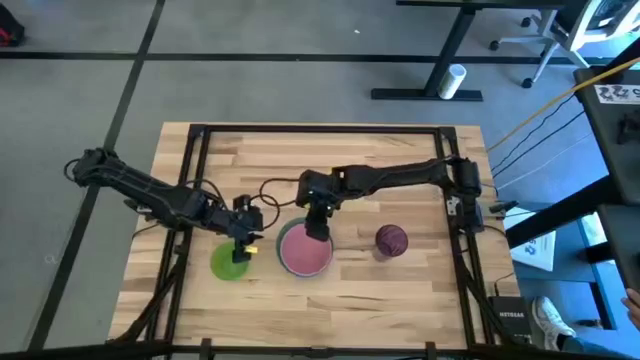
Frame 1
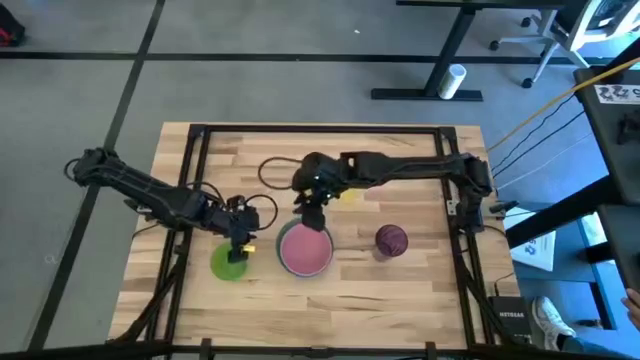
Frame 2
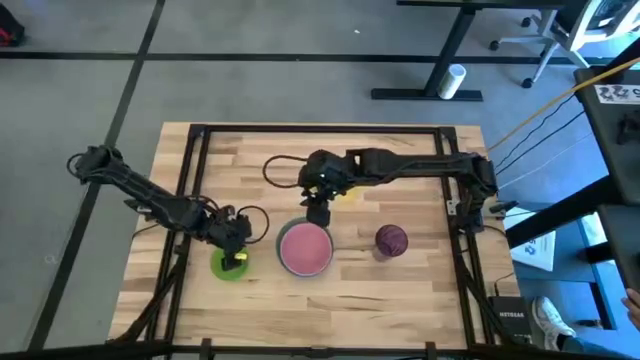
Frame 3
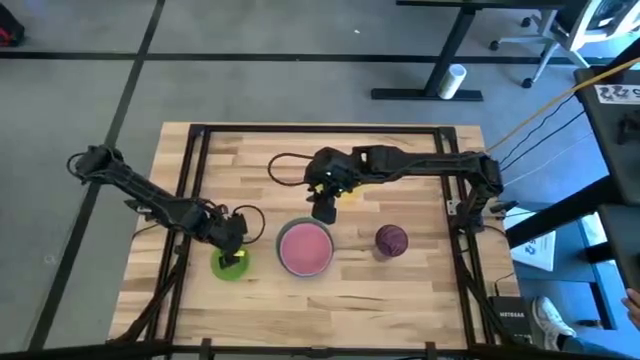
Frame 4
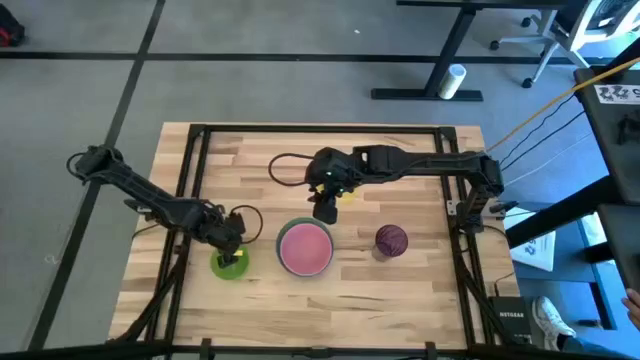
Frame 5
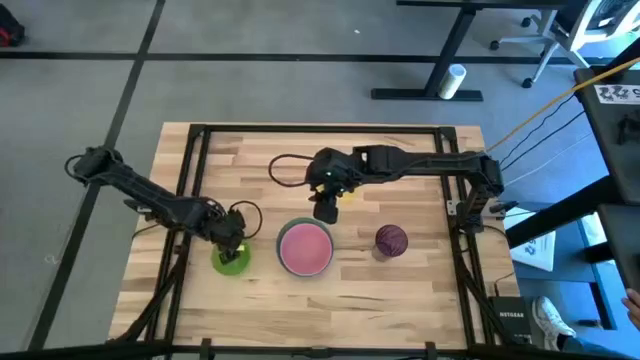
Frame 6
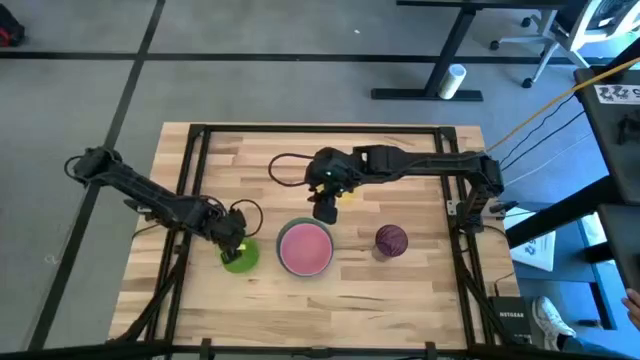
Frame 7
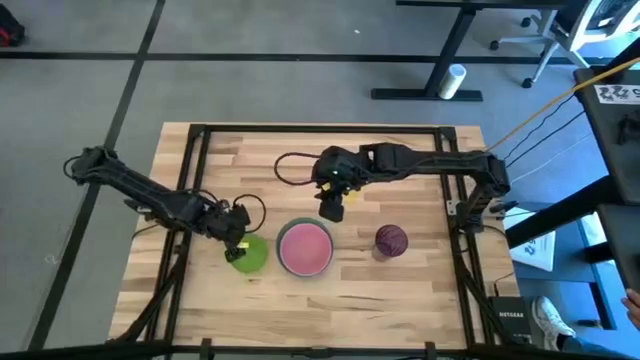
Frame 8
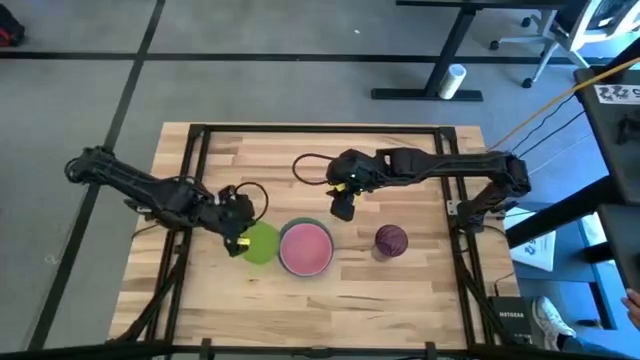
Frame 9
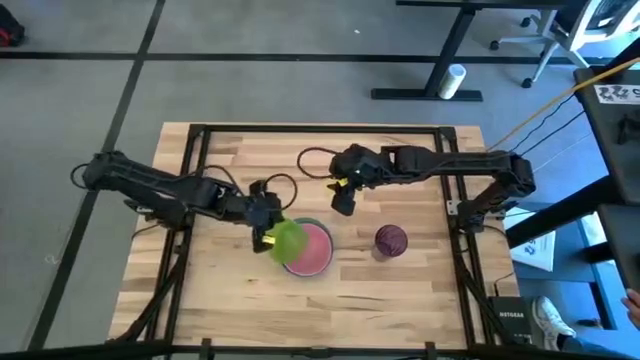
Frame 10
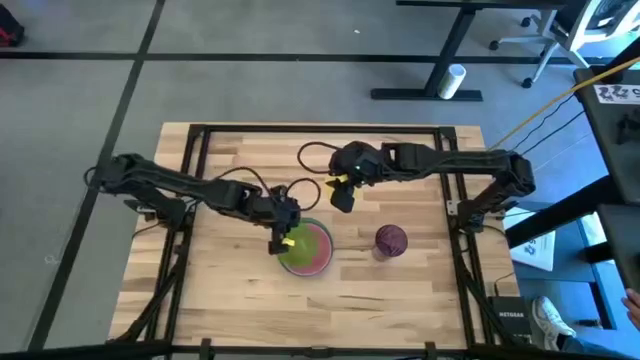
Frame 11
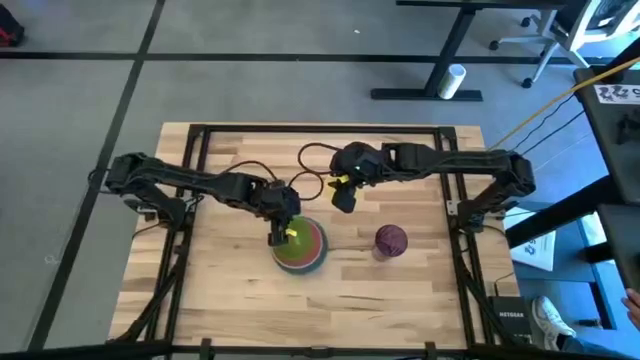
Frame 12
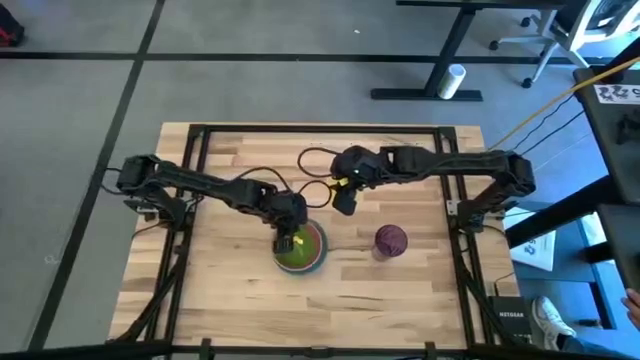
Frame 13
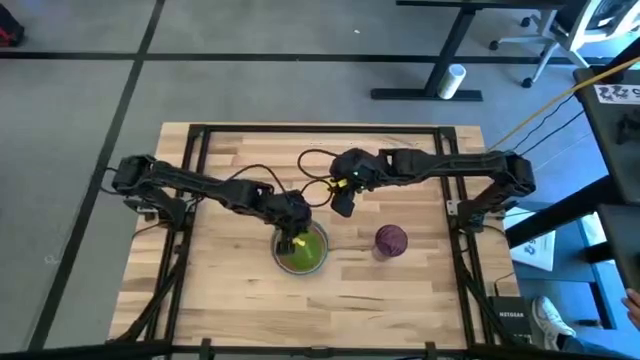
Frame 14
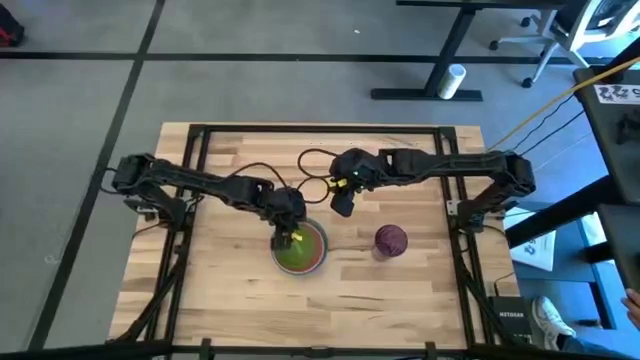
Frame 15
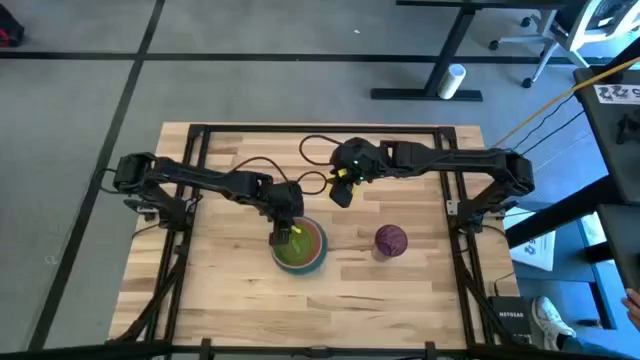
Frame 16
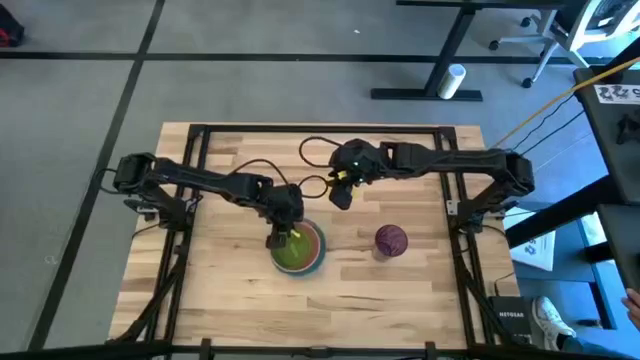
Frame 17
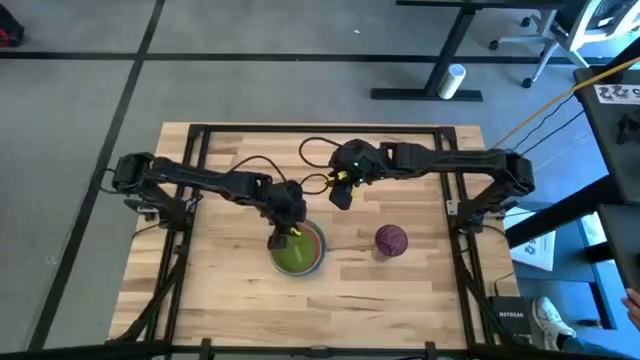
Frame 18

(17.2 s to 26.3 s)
Stack the green bowl on top of the pink bowl

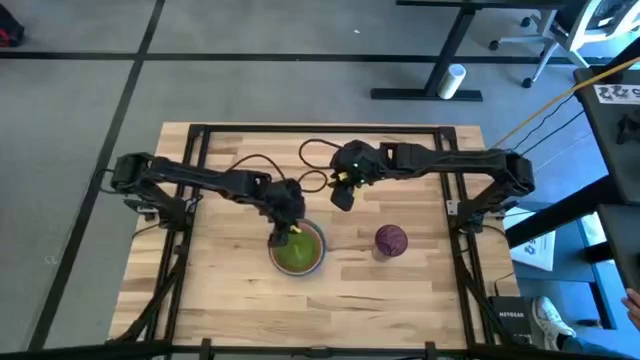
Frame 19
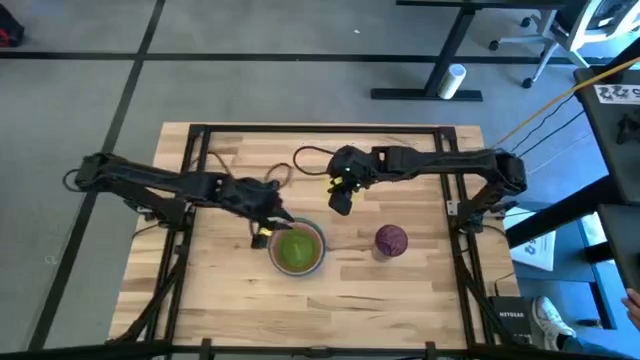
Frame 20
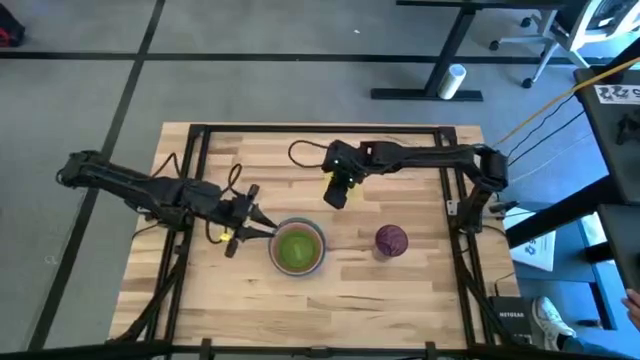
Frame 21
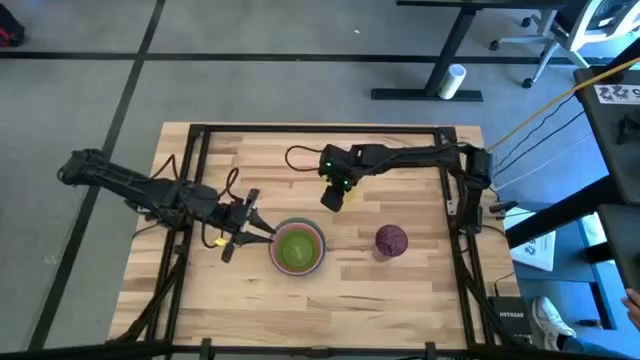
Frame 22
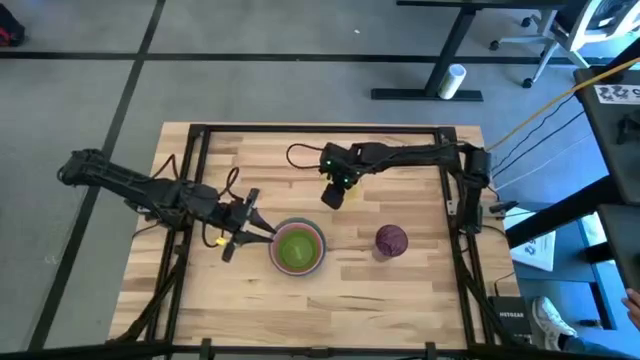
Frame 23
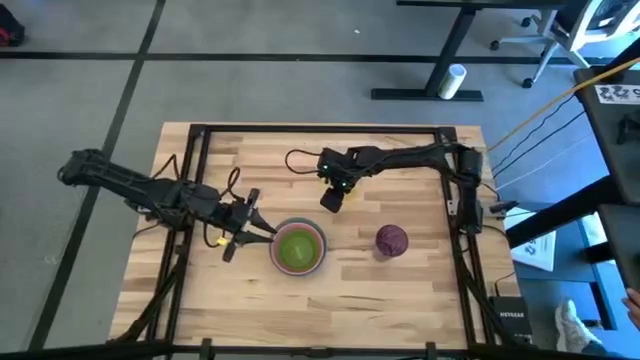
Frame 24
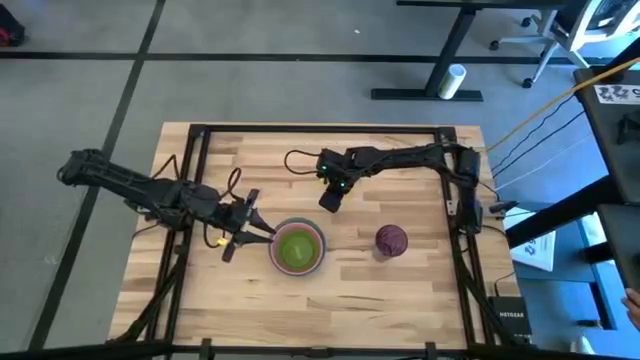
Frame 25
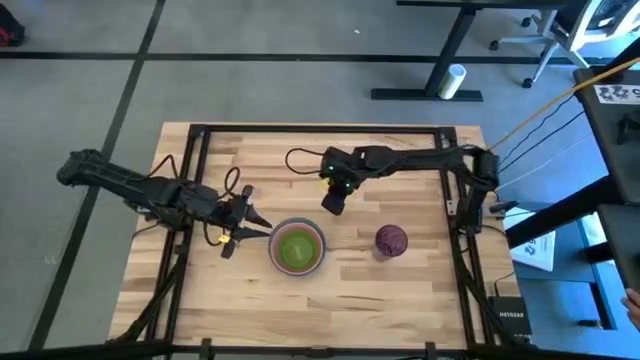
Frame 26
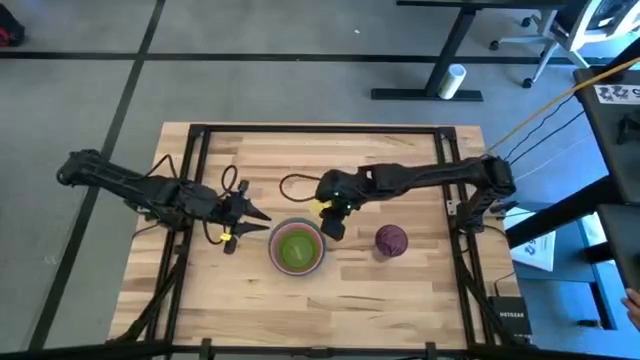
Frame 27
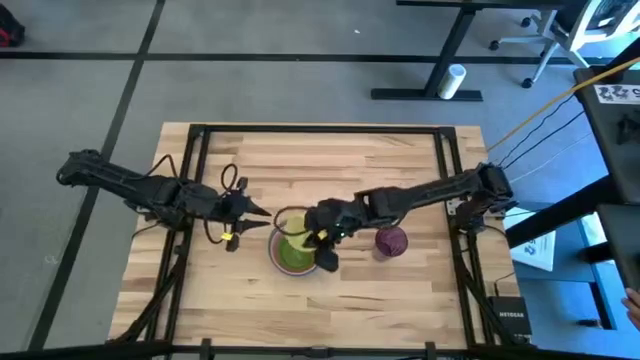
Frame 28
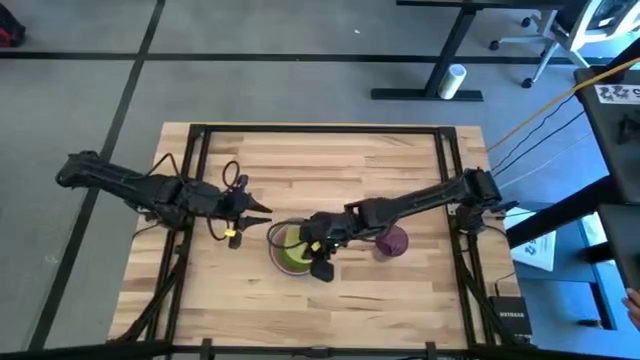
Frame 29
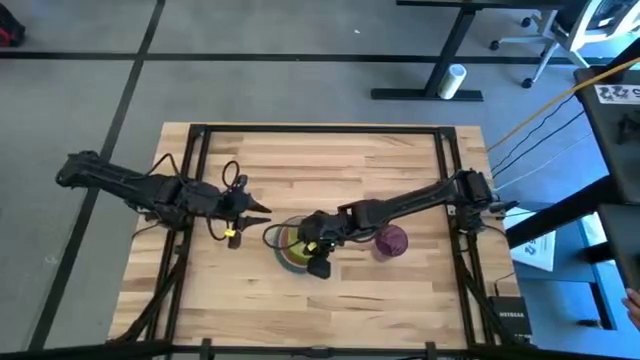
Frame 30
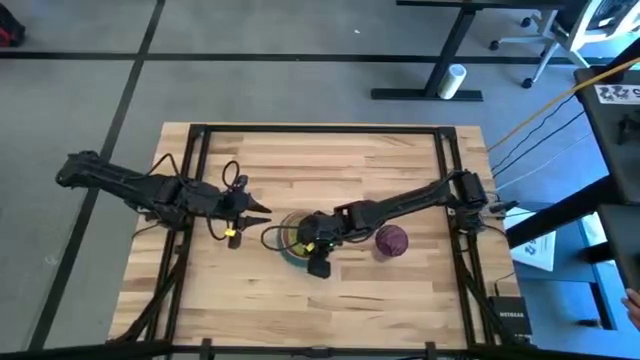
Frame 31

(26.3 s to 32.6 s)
Stack the yellow bowl on top of the green bowl

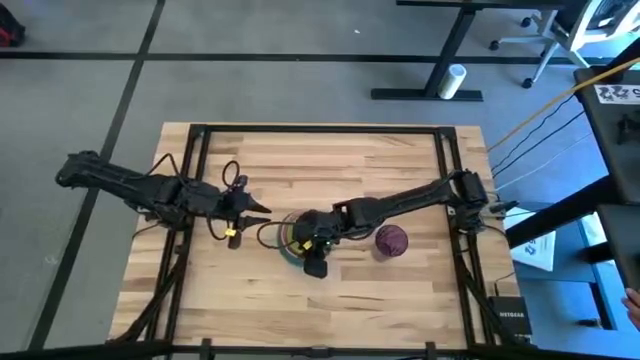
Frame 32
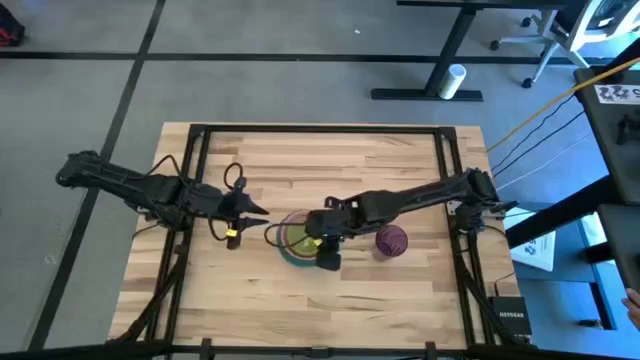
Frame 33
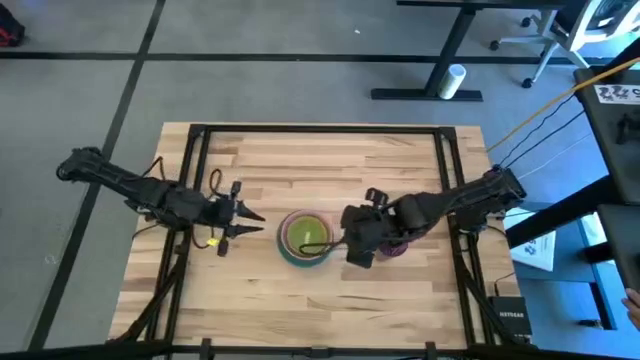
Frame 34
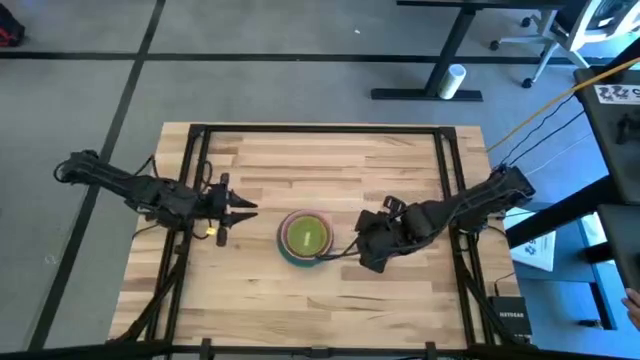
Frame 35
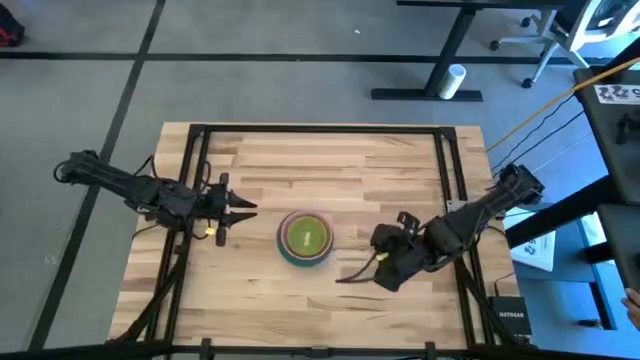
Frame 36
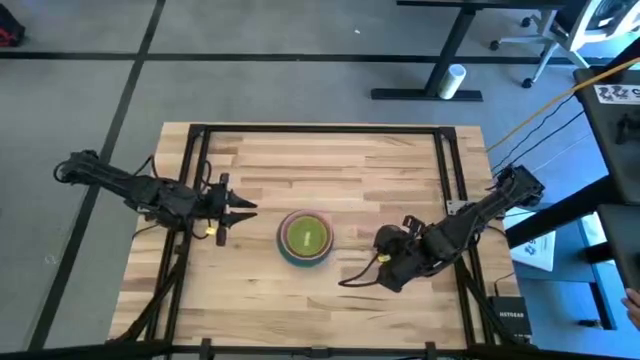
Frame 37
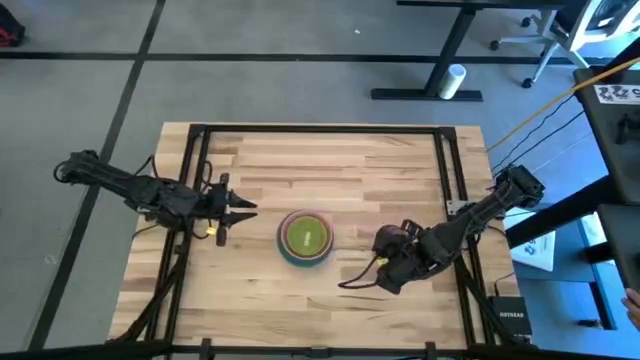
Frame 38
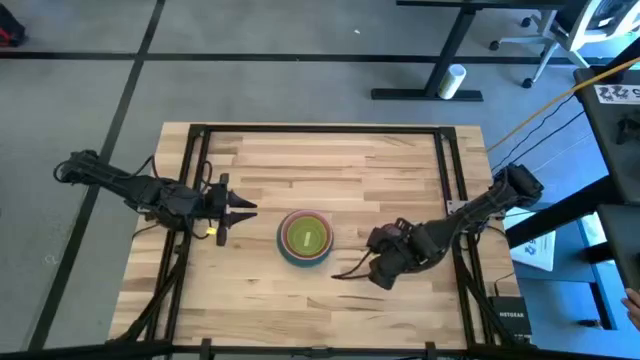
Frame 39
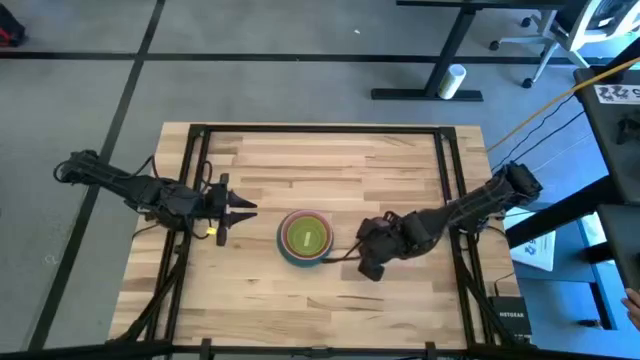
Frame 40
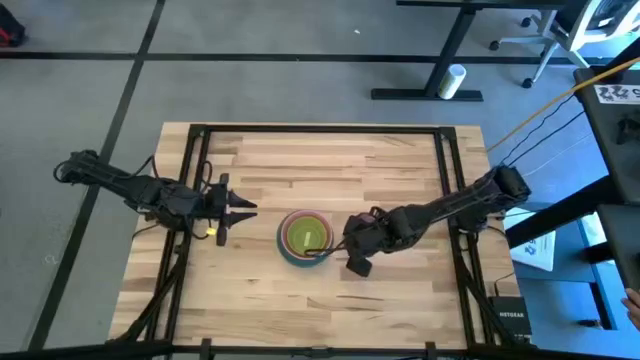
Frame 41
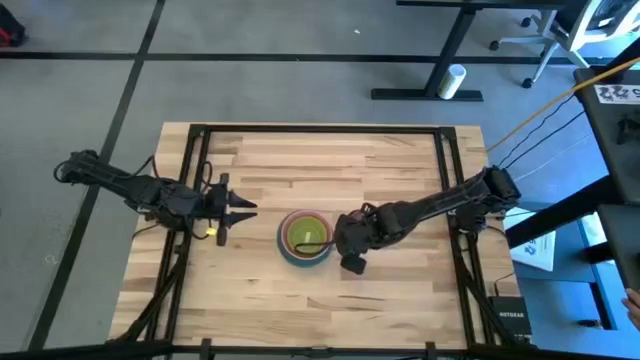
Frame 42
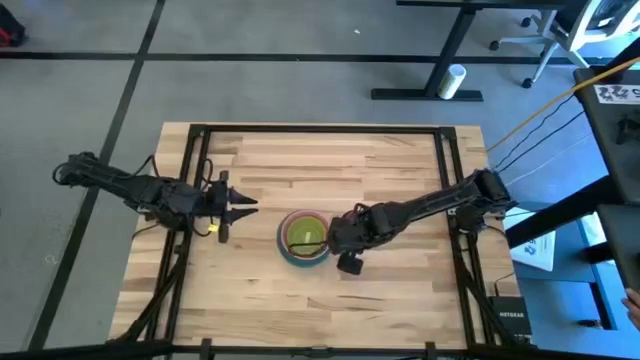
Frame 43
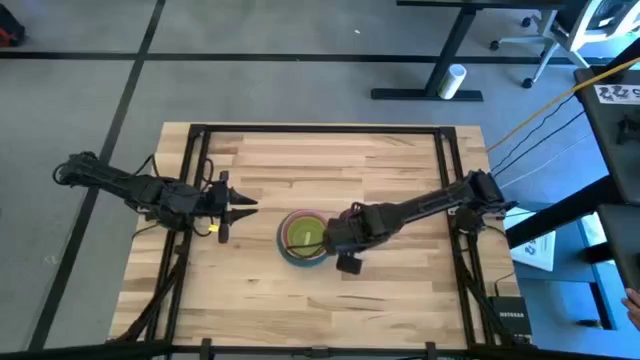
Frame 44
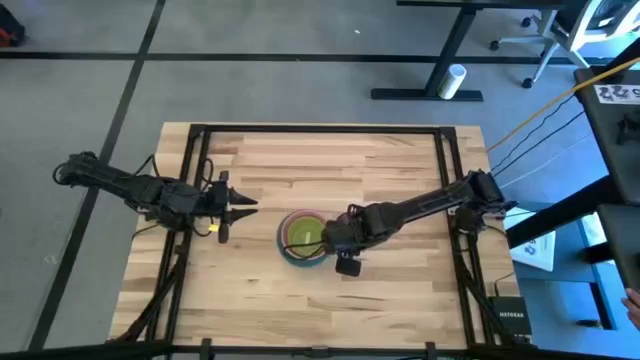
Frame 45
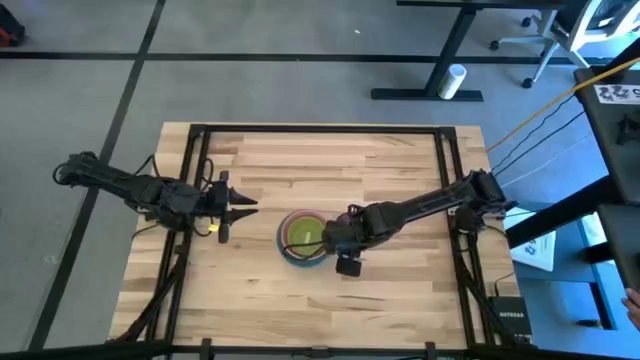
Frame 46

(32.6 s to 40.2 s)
Move the violet cup to the right of the stacked bowls
